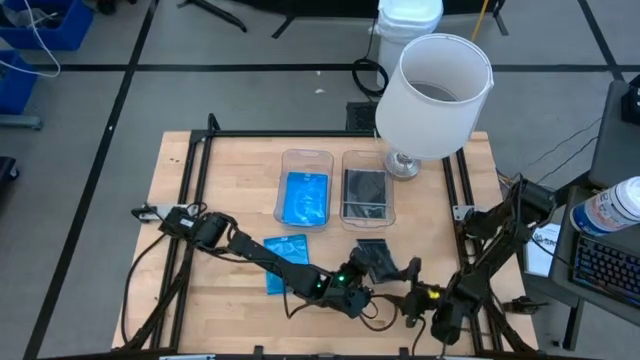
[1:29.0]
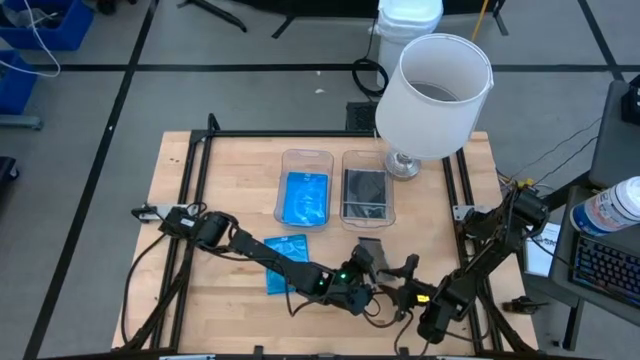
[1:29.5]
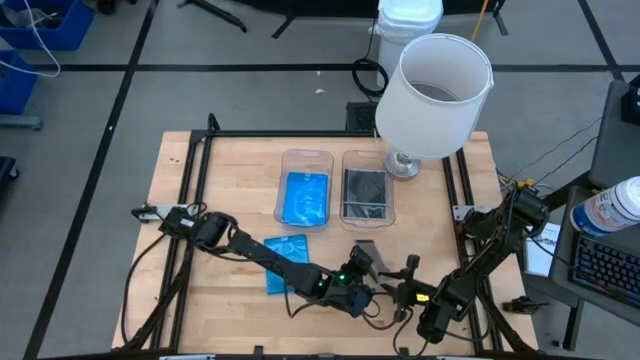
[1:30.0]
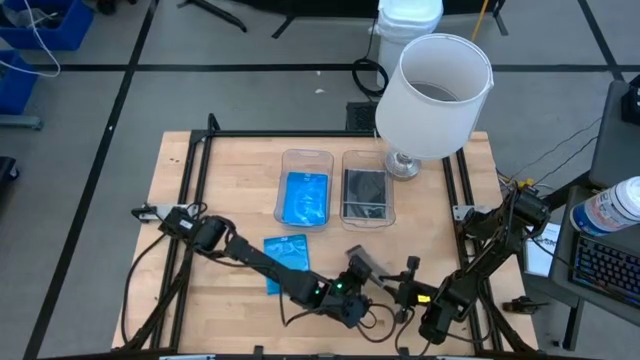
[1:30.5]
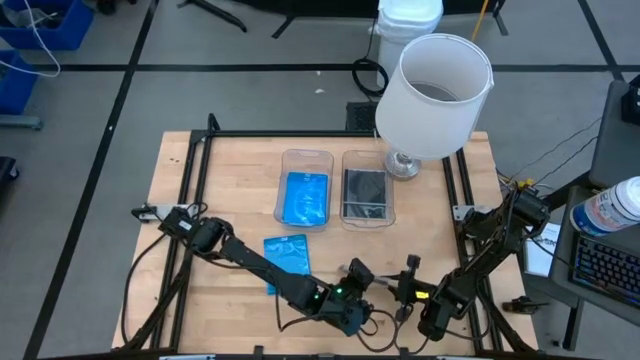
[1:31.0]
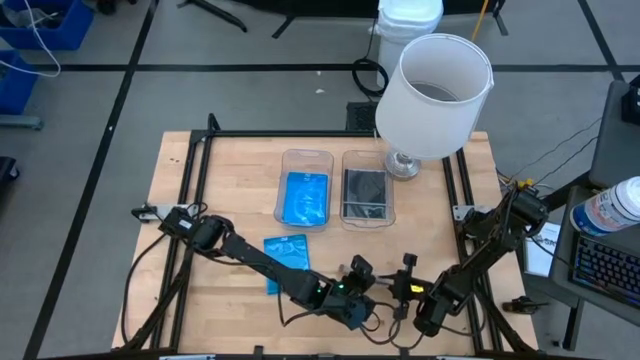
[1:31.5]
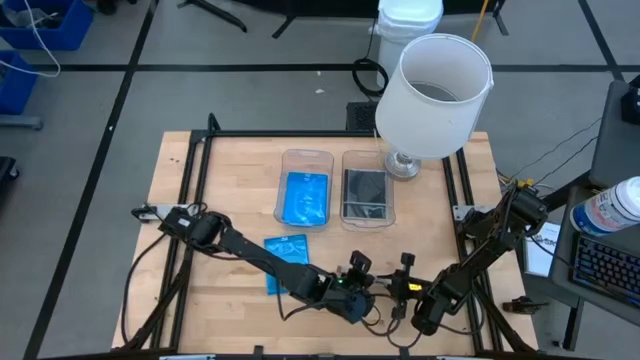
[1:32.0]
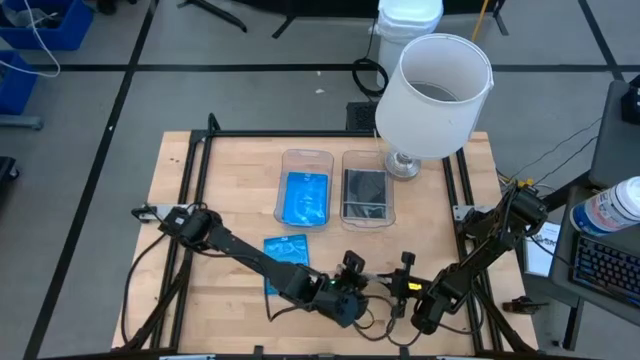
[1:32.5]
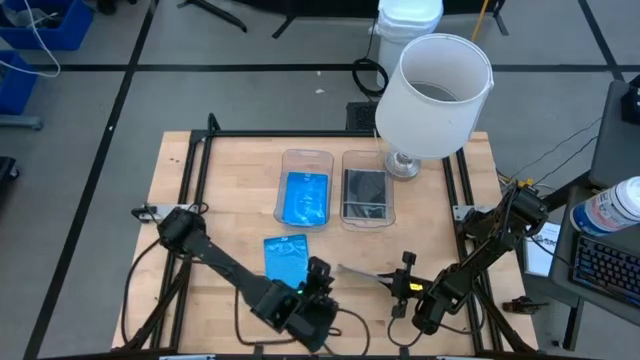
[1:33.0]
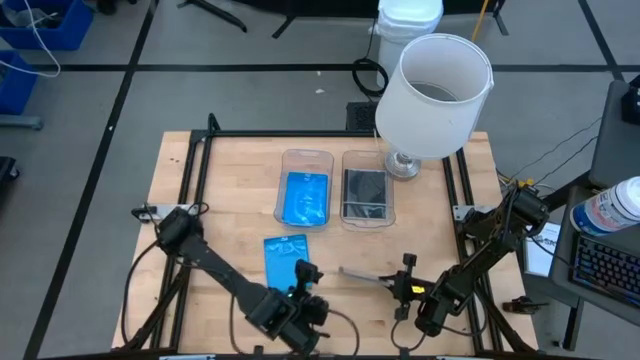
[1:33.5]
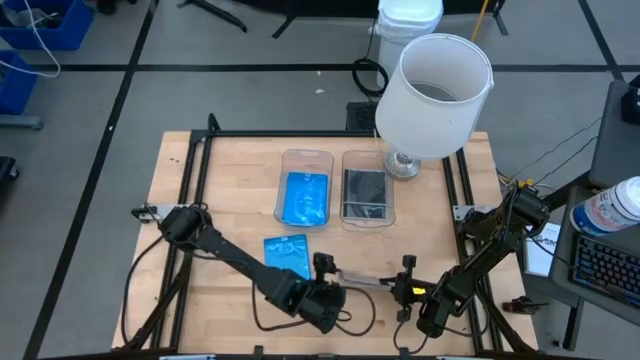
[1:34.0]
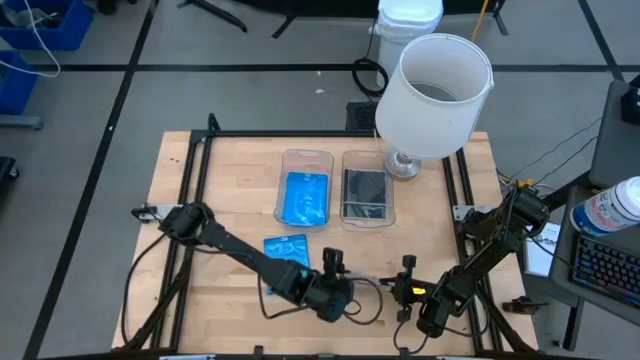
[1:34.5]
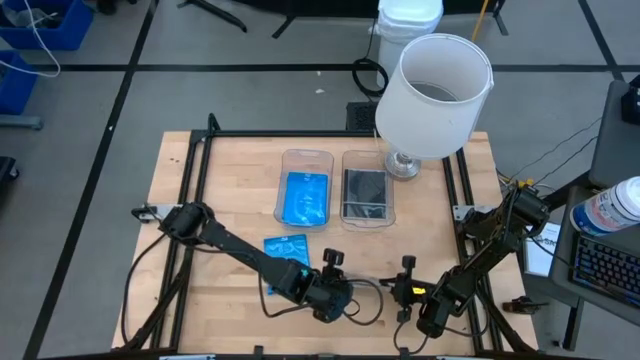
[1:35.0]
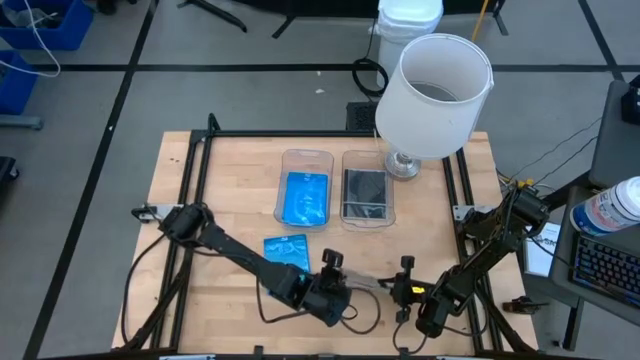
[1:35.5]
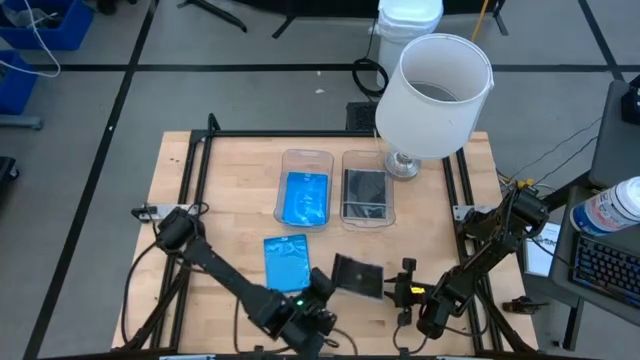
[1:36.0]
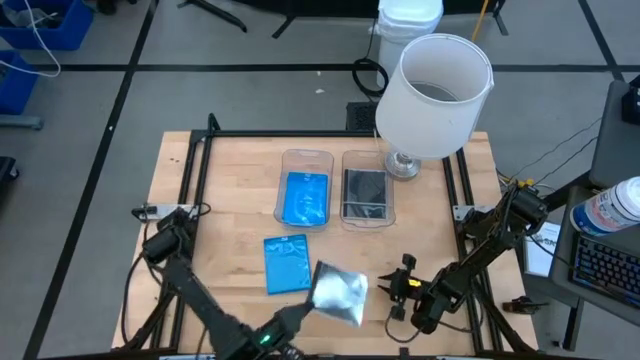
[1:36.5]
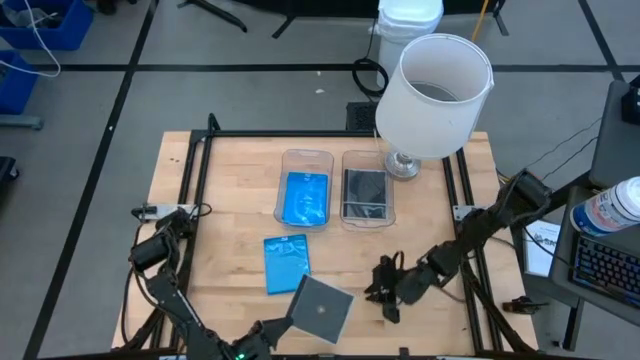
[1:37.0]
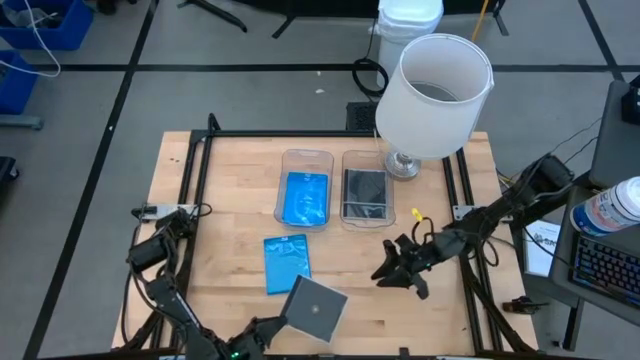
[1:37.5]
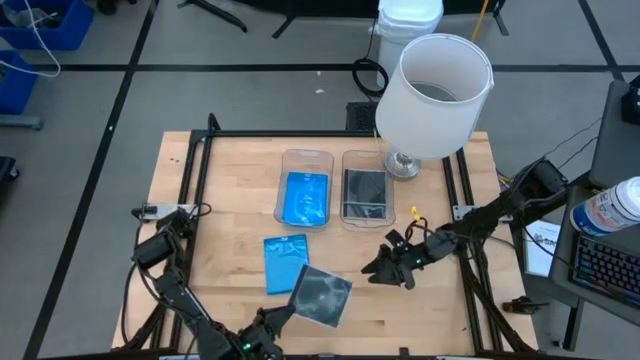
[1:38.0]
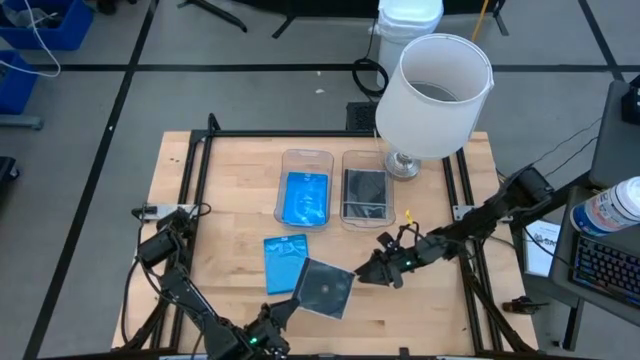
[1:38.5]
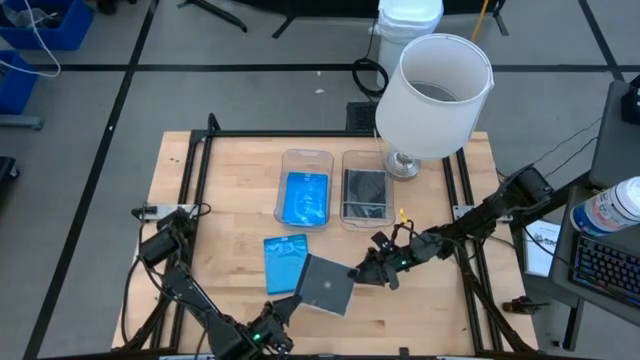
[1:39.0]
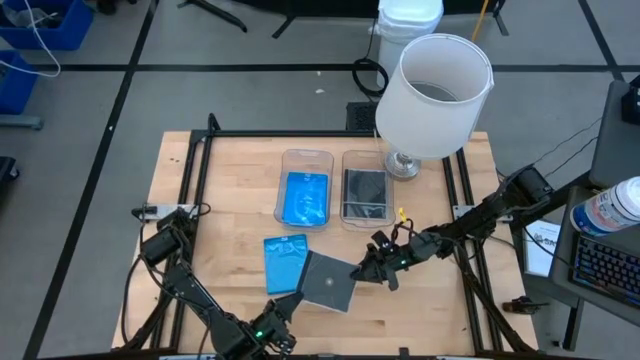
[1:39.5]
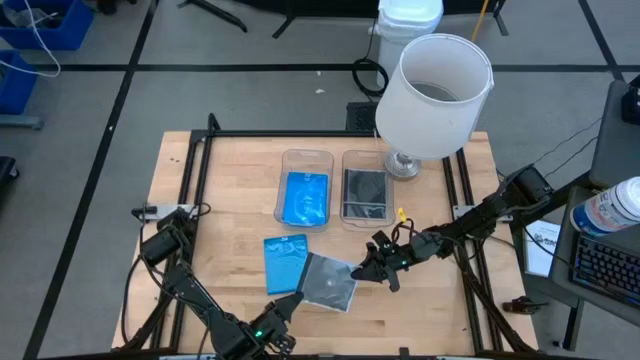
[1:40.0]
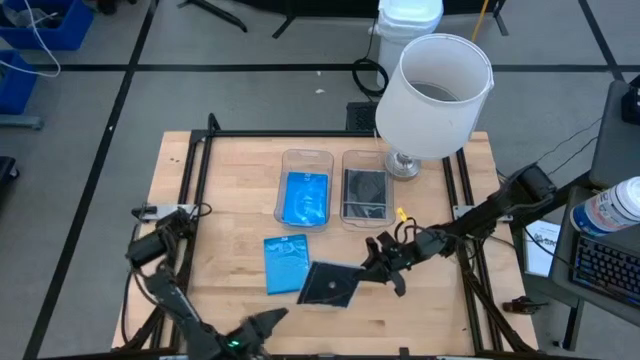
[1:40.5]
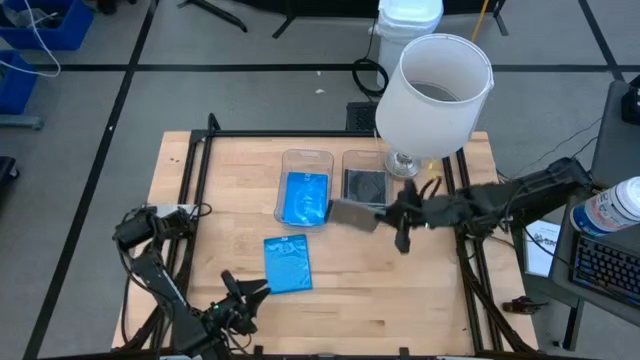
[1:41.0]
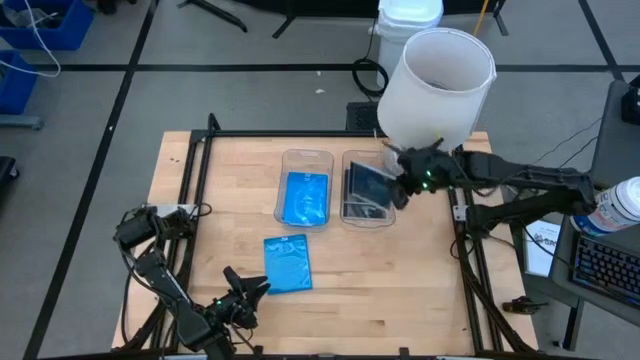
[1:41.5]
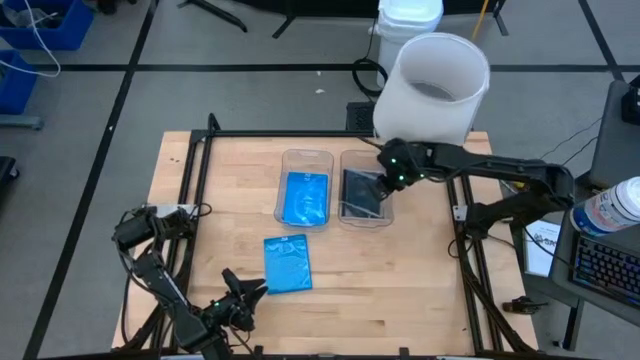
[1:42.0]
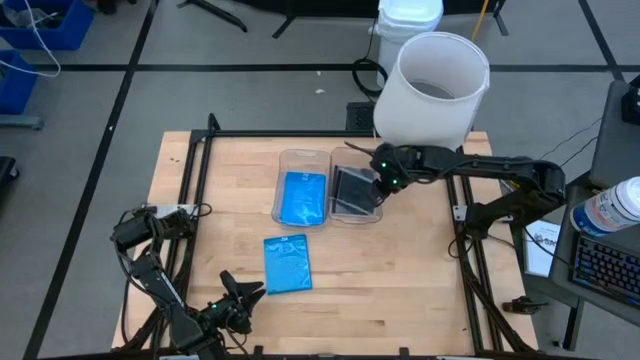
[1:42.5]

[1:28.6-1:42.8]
Task: Pick & place jewel cases by type
Put the black cd case into the right transparent bin

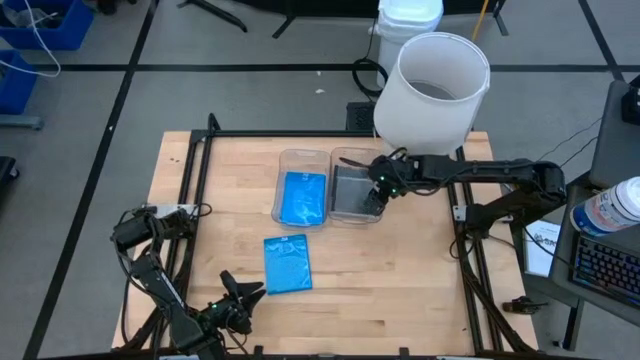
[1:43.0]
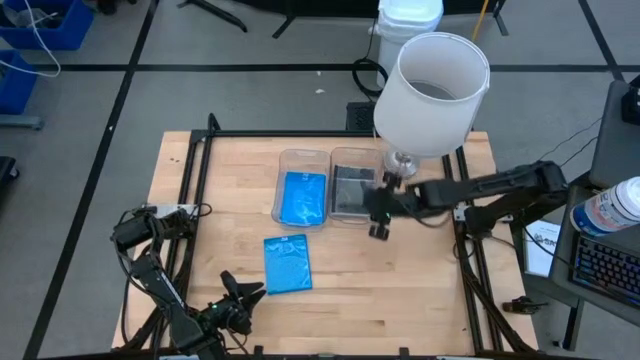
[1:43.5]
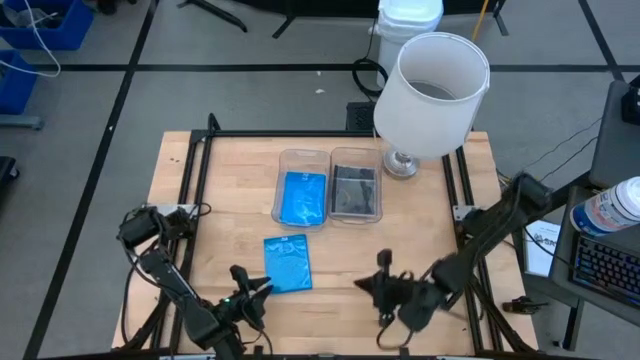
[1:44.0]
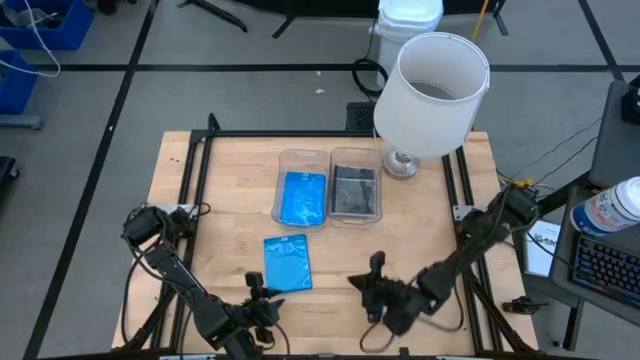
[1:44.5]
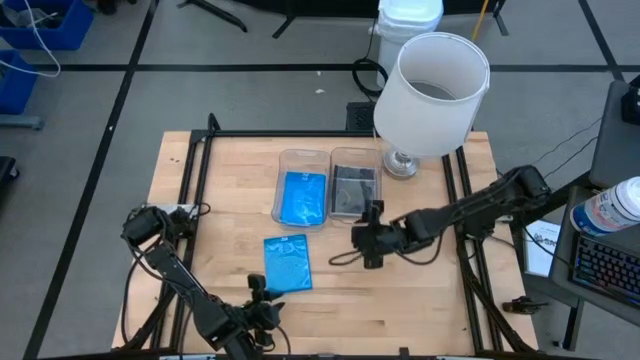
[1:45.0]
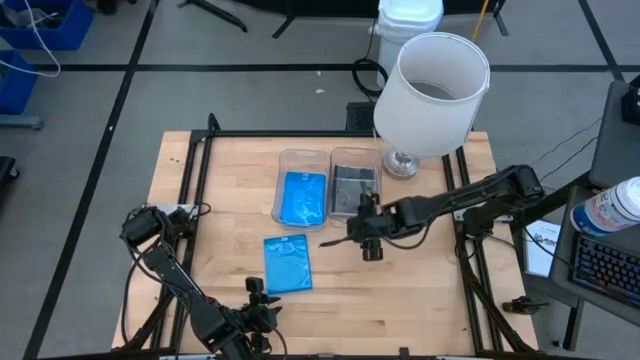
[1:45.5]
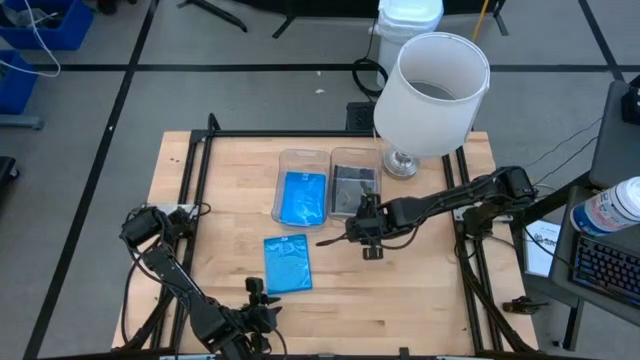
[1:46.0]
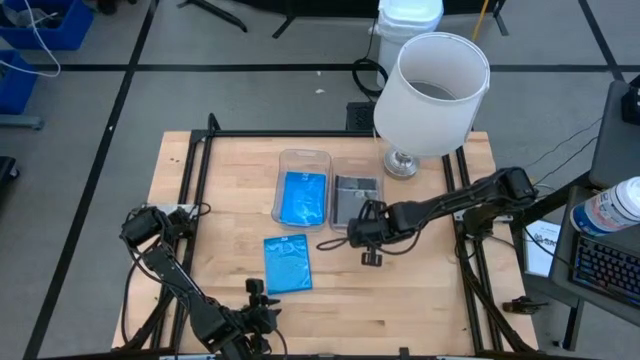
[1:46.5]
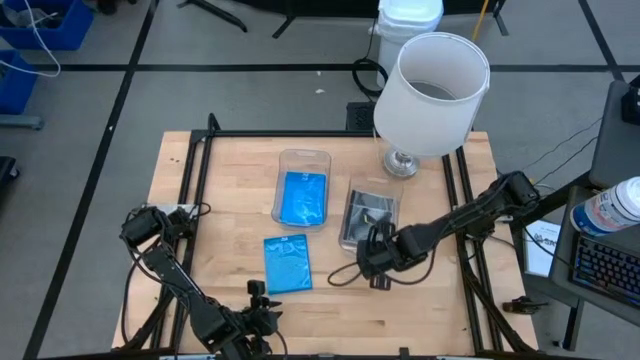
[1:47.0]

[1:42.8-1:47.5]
Adjust the right transparent bin

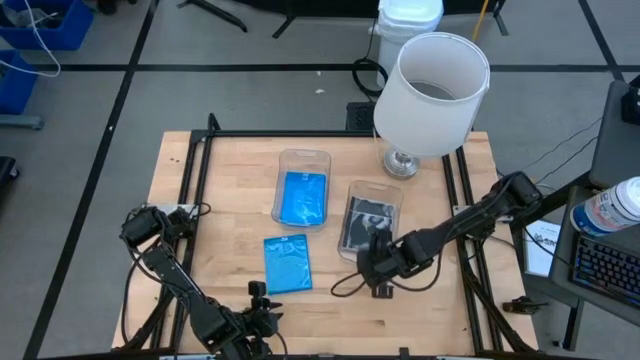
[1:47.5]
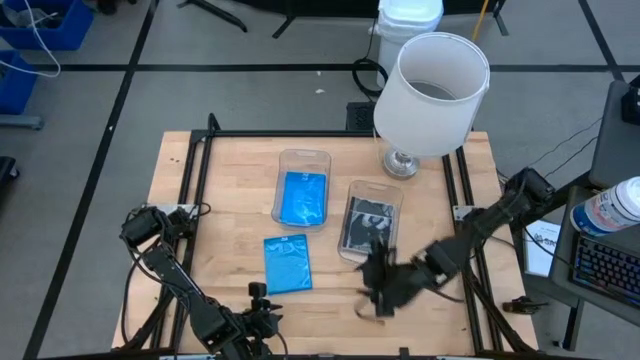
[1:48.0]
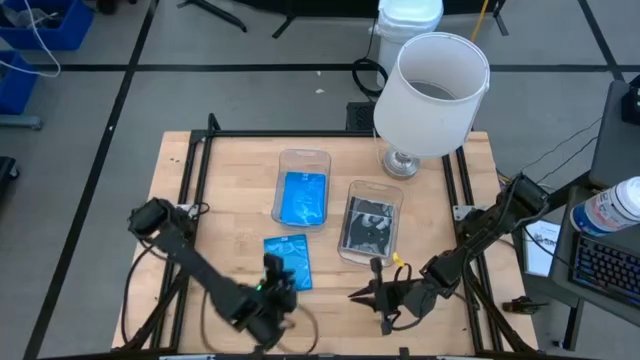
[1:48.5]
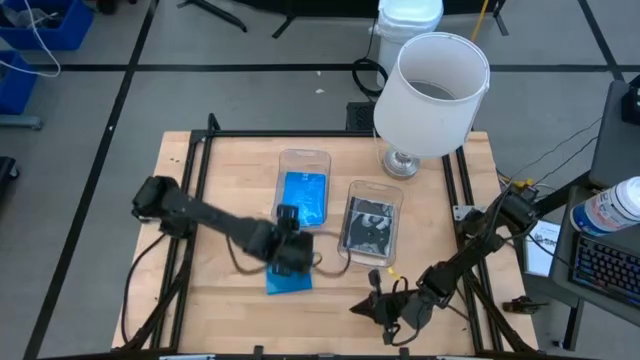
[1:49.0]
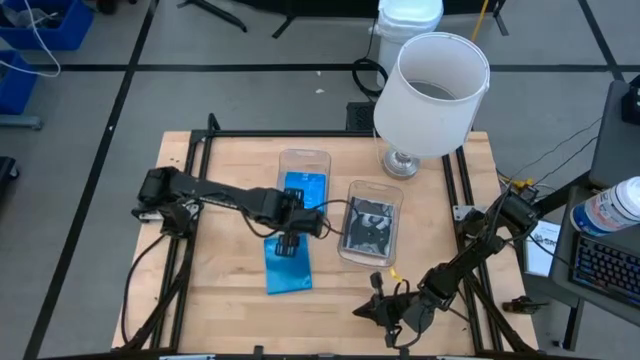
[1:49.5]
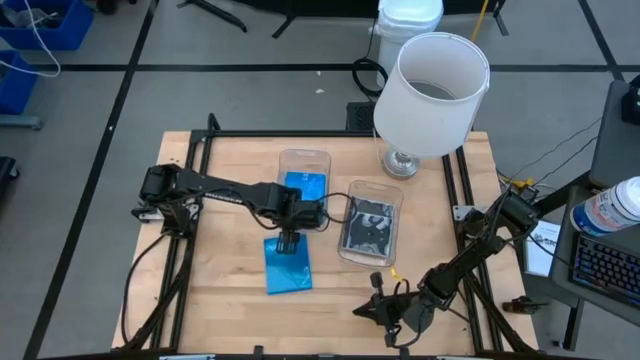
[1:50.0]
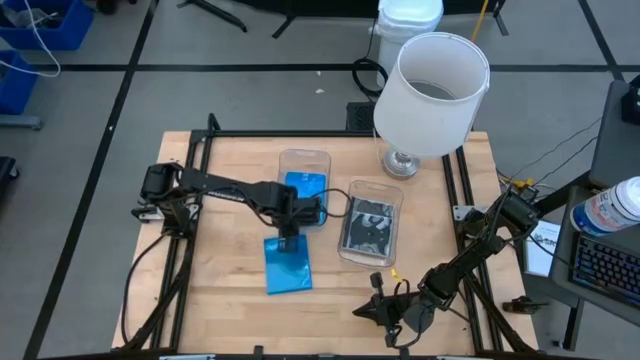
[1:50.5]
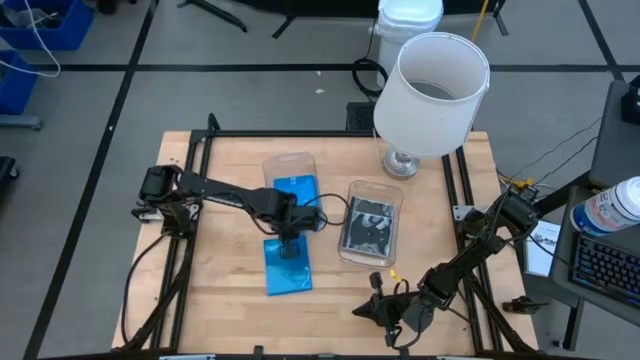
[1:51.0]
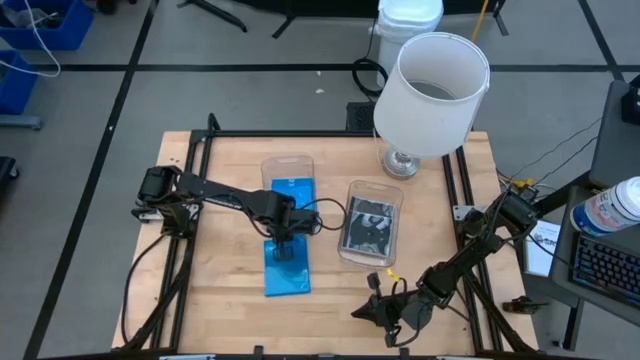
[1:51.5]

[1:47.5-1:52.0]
Adjust the left transparent bin
